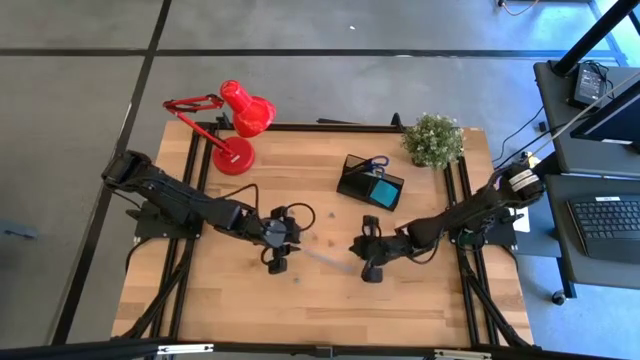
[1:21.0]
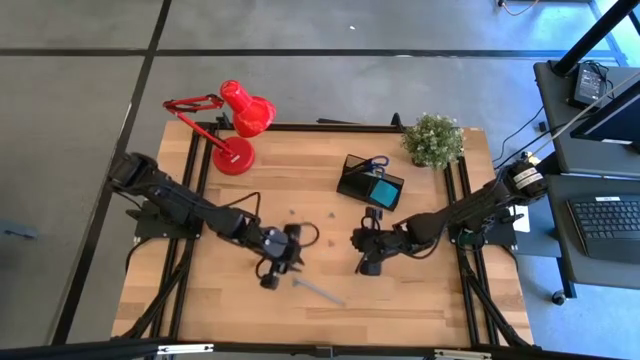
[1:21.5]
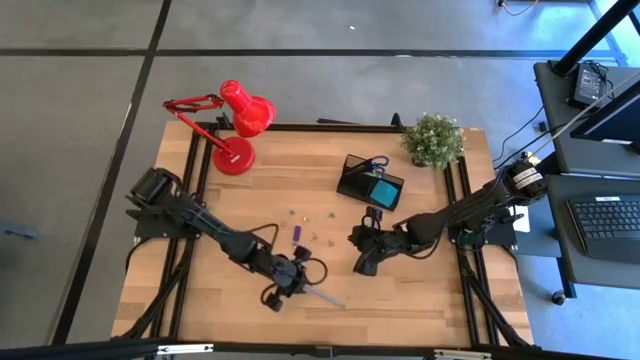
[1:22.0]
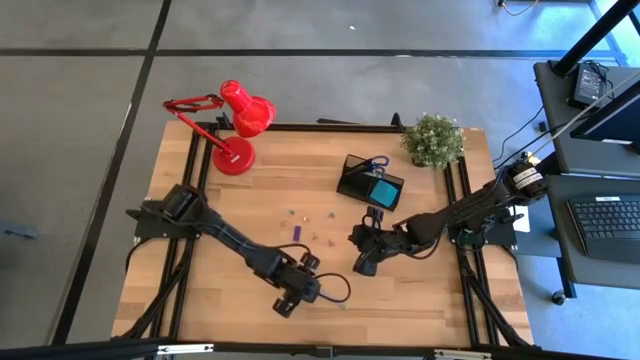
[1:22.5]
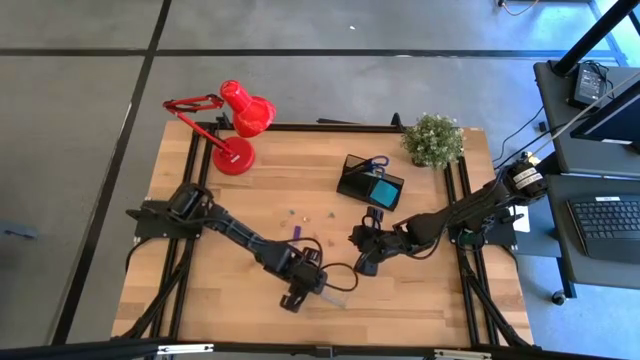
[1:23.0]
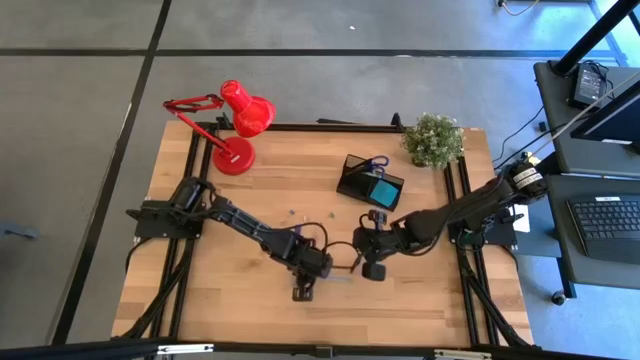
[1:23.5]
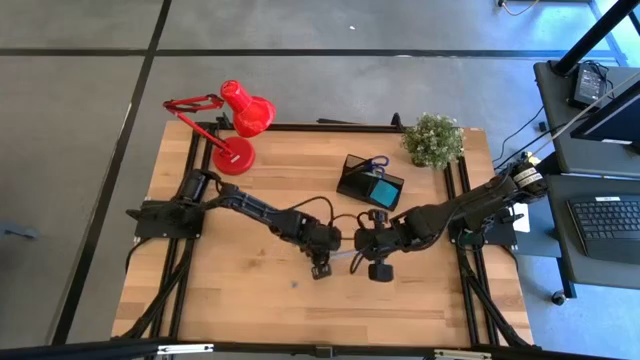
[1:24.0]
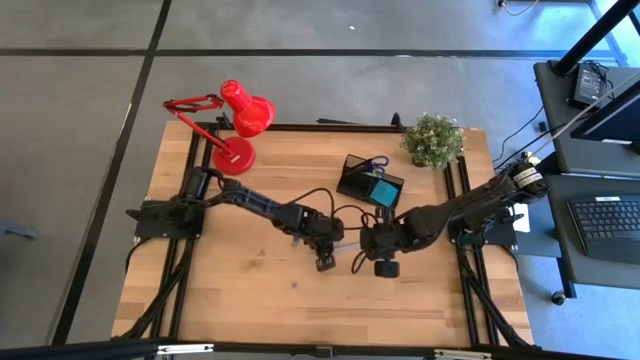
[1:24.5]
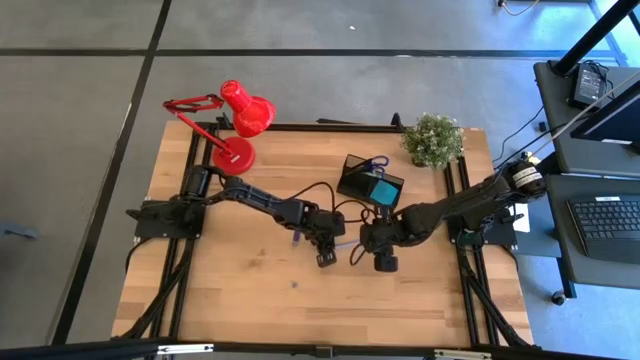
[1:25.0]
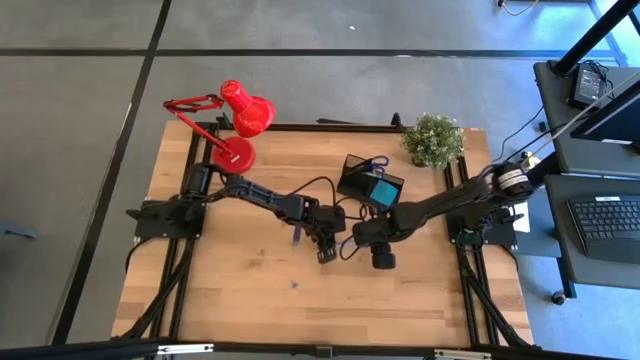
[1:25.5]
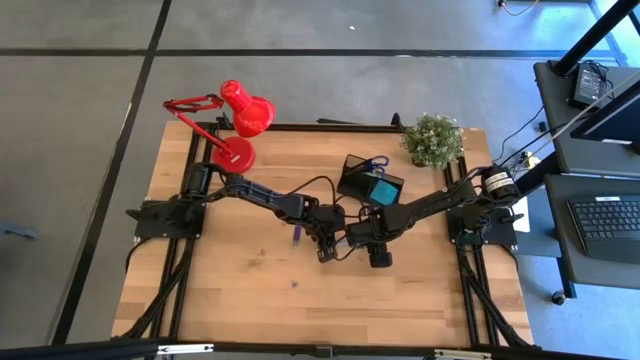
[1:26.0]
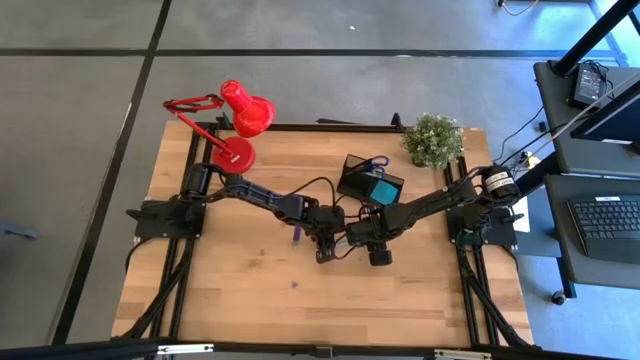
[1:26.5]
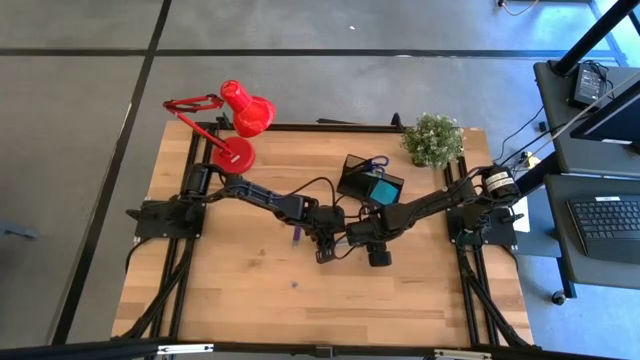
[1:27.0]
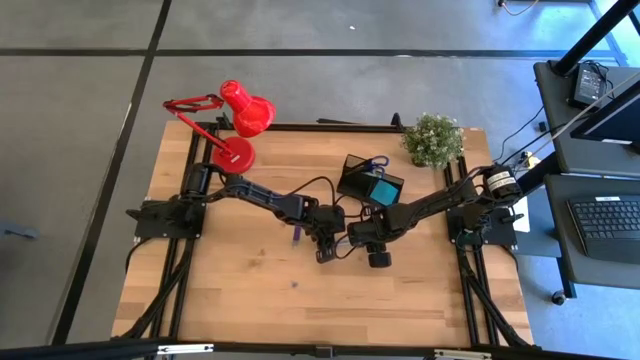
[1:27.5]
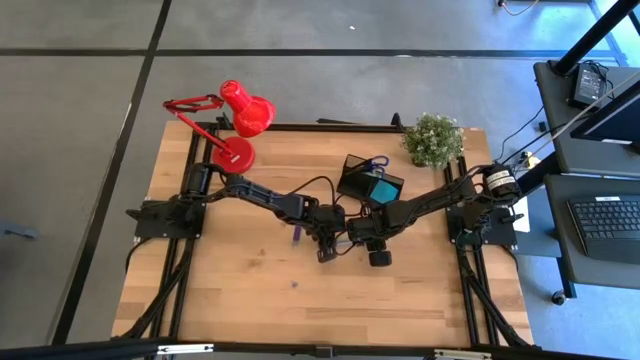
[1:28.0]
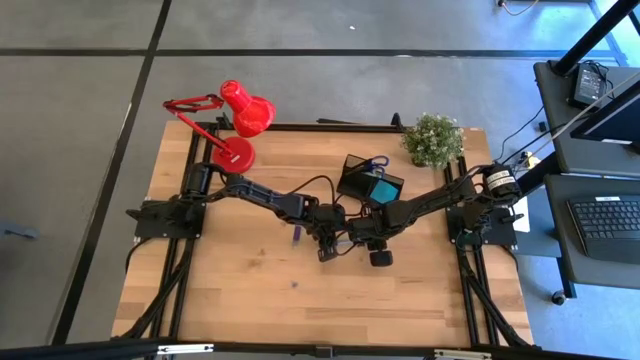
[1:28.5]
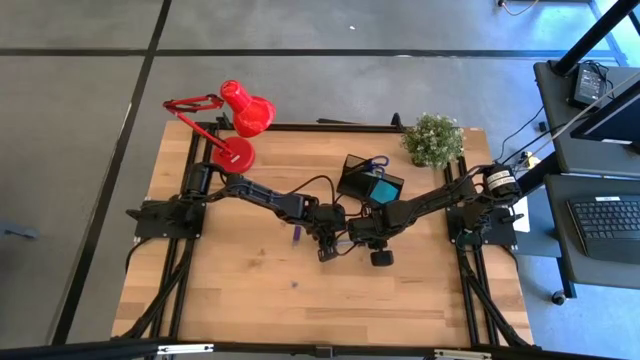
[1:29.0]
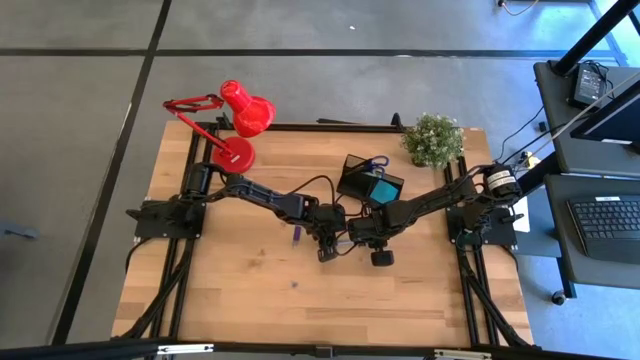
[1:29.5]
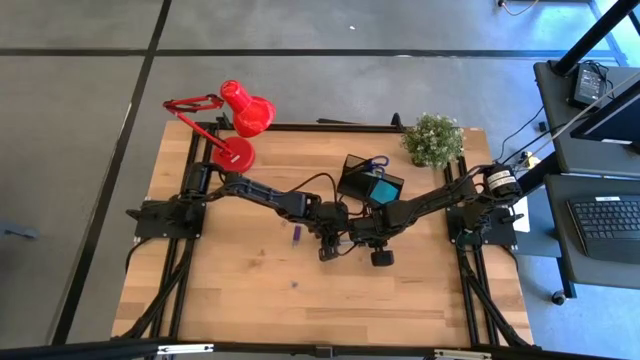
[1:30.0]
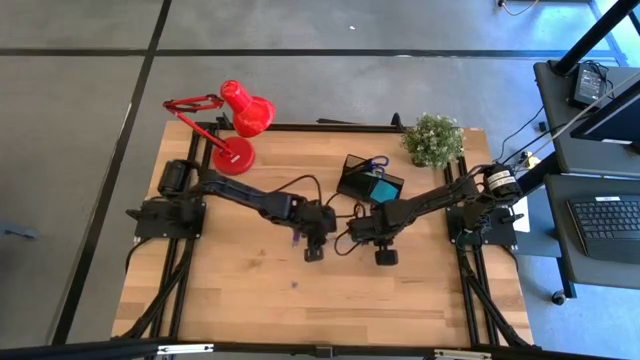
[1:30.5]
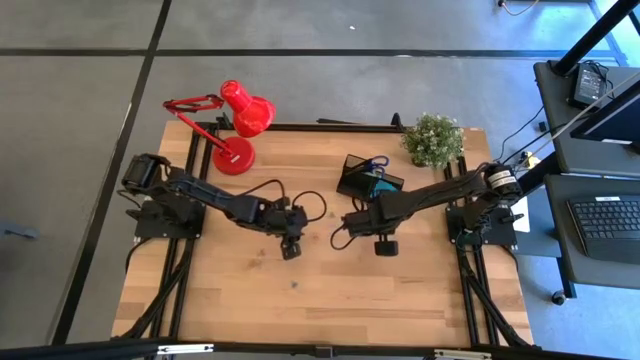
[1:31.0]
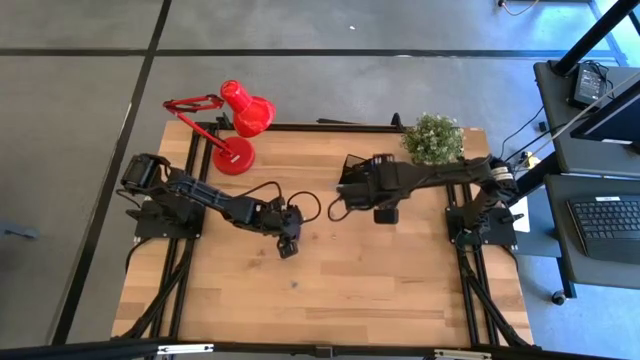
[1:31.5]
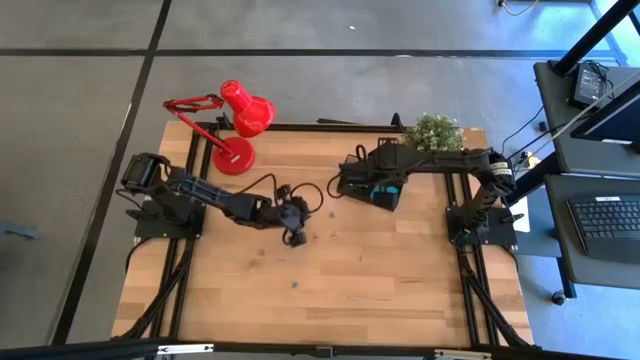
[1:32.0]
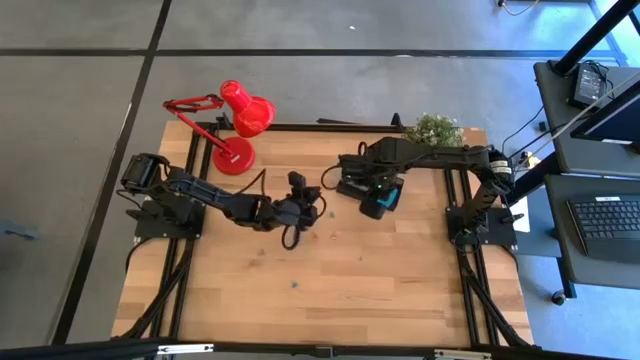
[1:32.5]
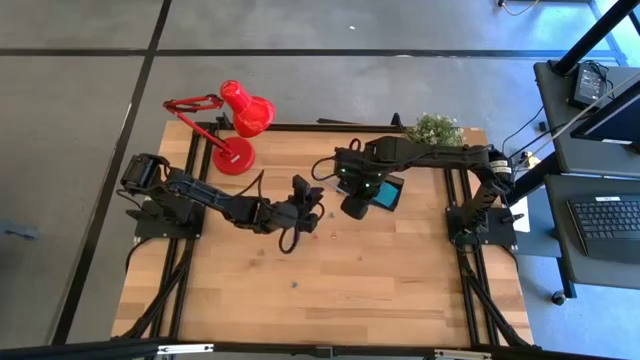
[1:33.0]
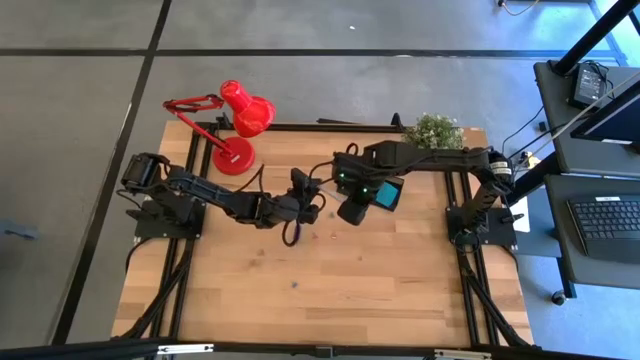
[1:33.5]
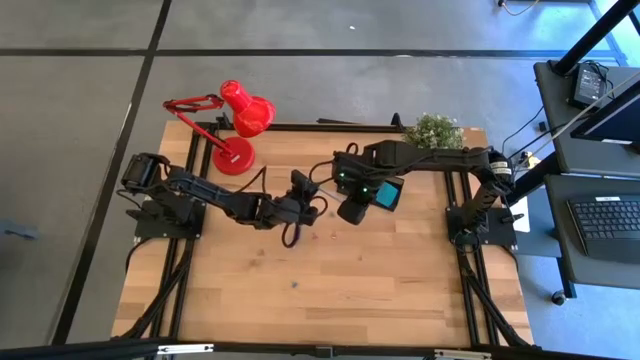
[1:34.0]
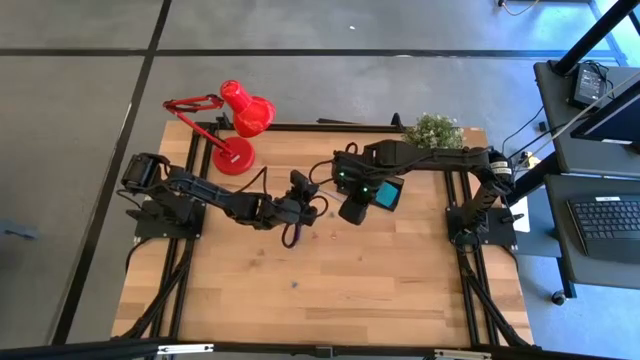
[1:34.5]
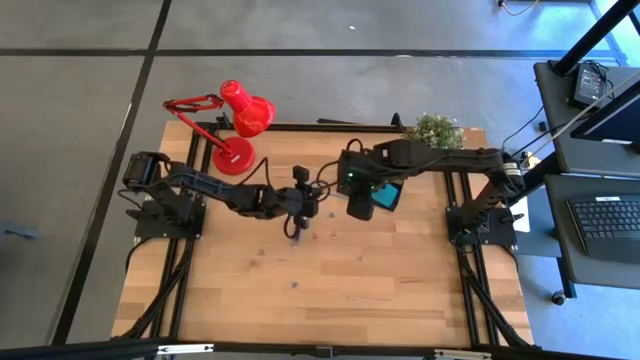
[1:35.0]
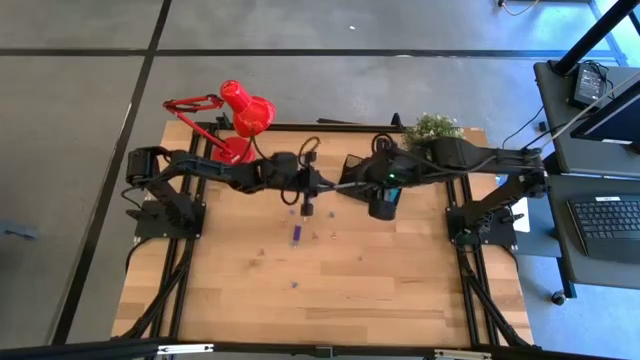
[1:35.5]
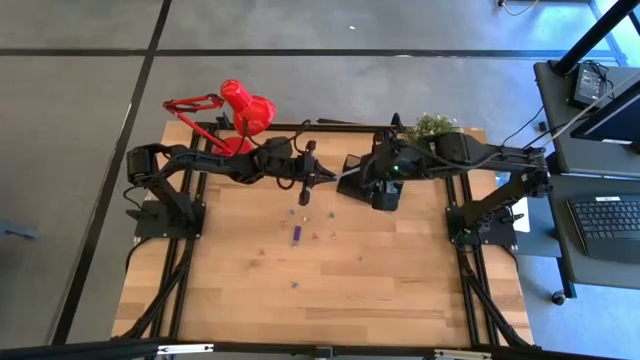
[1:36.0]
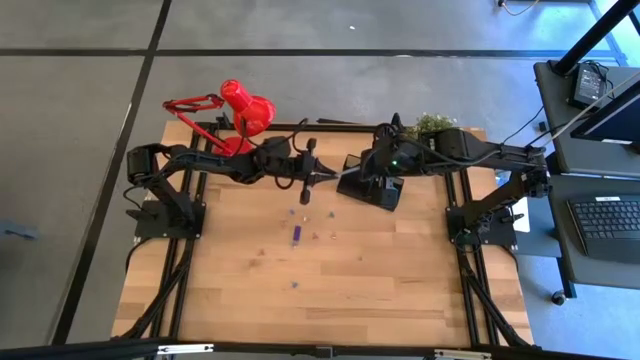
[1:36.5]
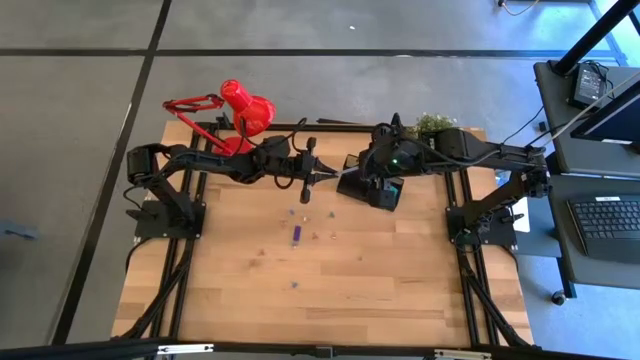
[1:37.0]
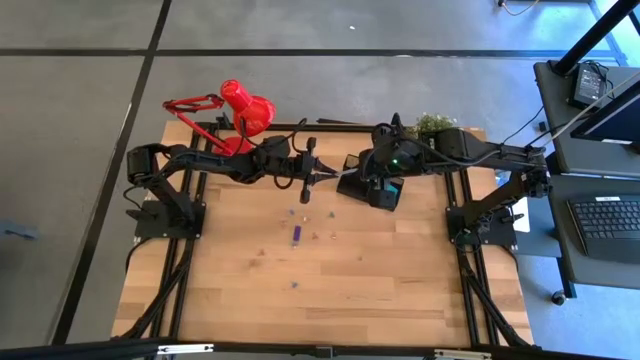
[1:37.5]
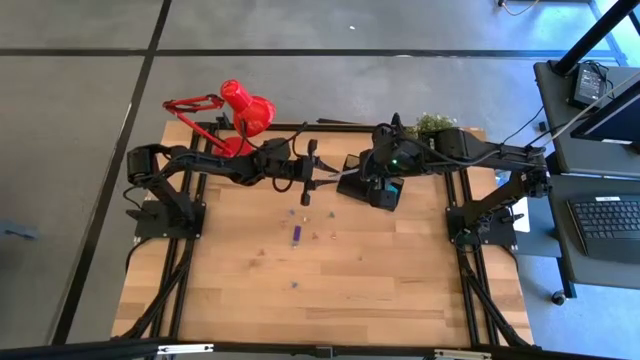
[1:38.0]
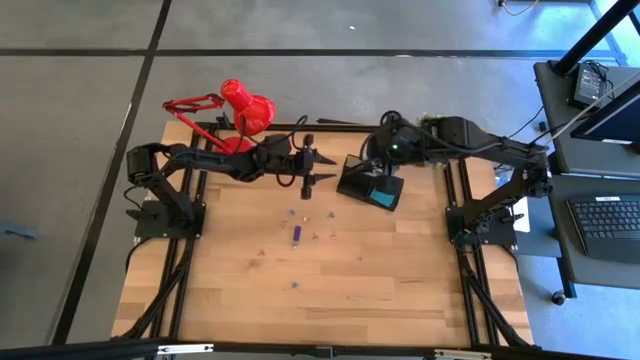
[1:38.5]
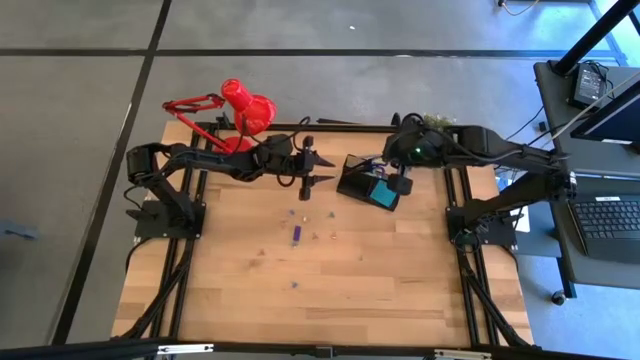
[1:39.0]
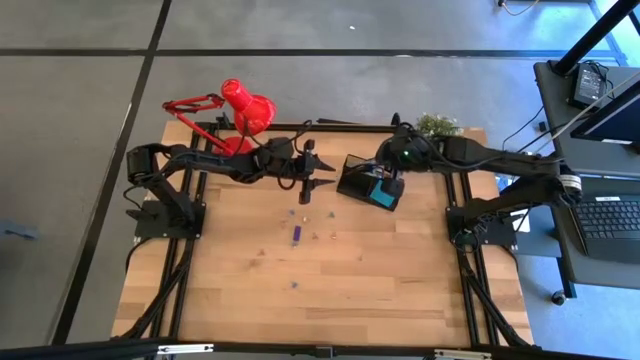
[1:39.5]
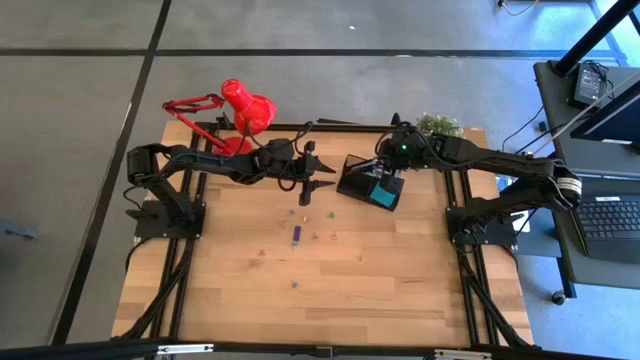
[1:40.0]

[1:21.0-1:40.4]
Task: Pick and place office supplies into organizer
Put the blue pencil into the black desk organizer

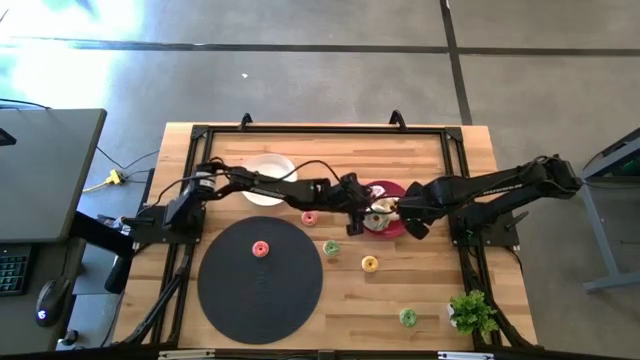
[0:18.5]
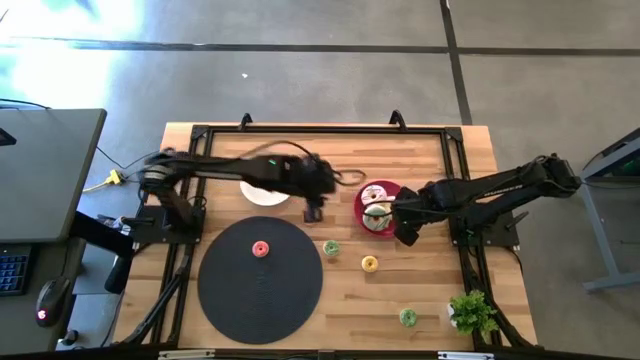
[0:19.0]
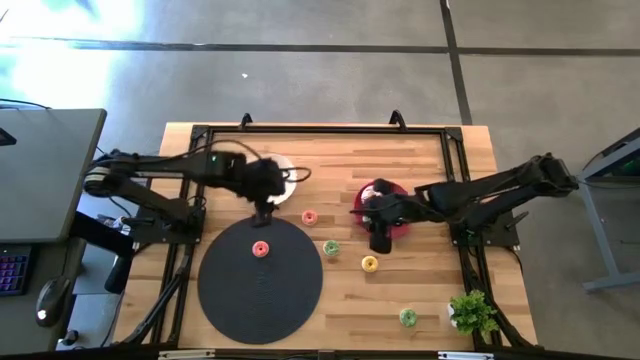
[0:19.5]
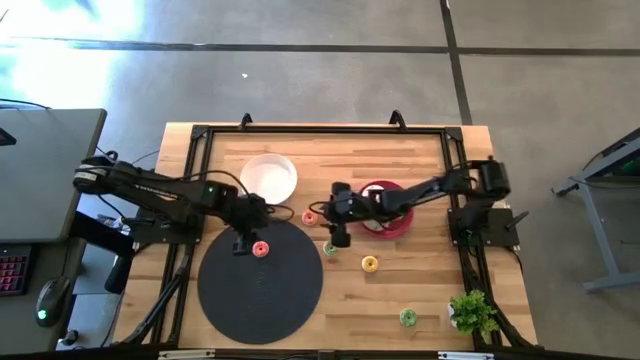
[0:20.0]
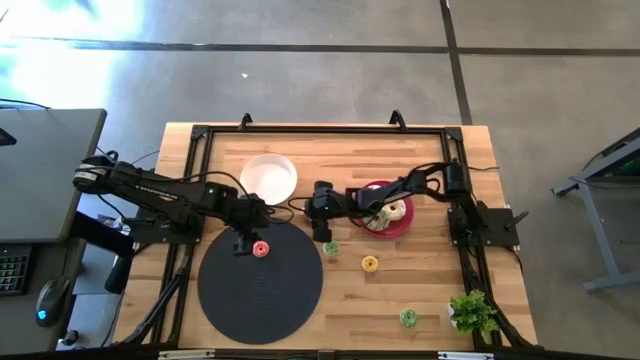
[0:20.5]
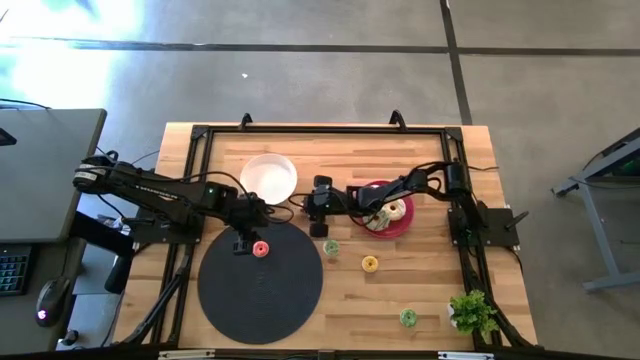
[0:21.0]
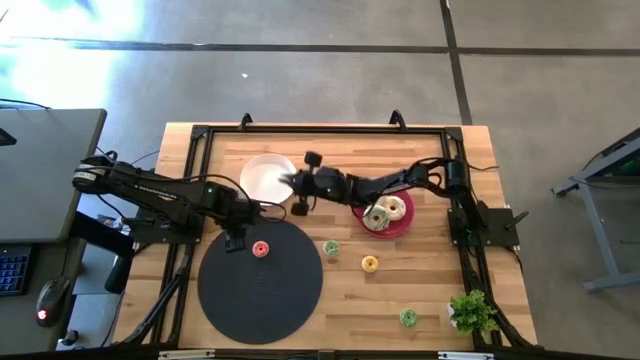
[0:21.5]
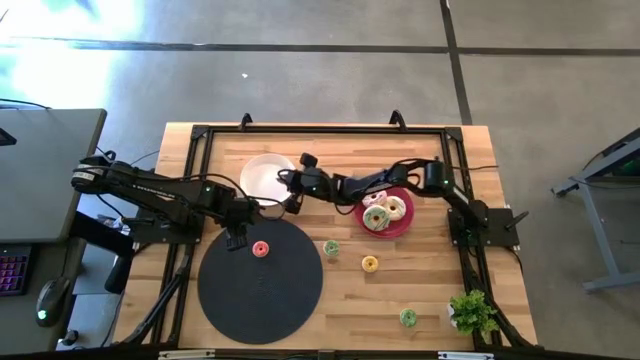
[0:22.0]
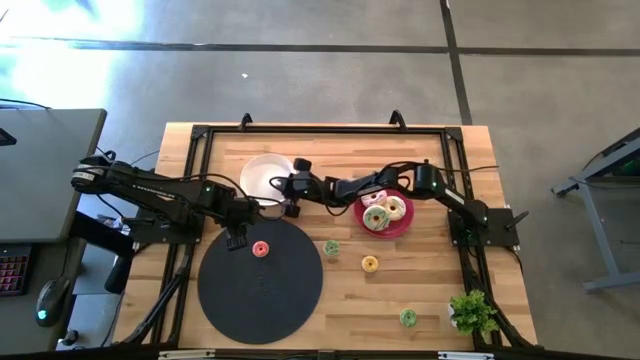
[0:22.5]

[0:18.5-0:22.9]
Task: Pick & Place donuts
Put the top small pink donut on the white plate
